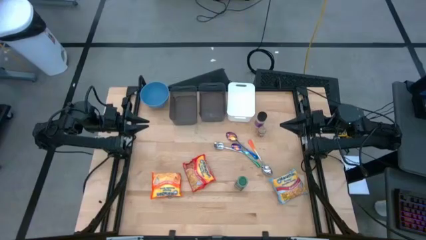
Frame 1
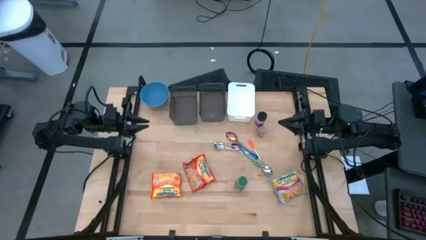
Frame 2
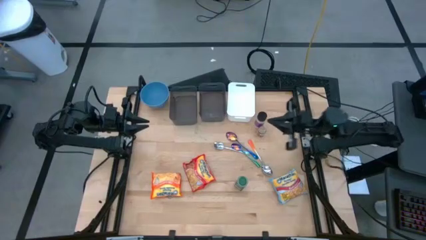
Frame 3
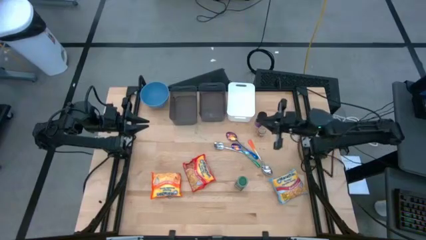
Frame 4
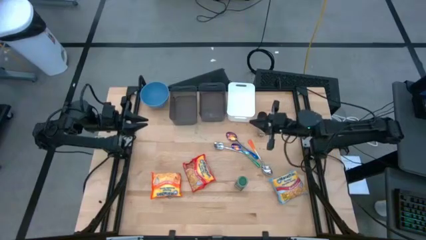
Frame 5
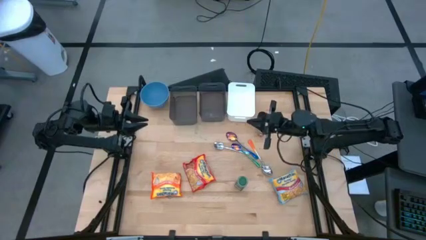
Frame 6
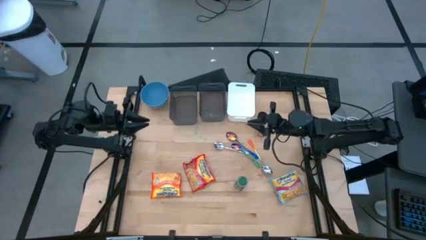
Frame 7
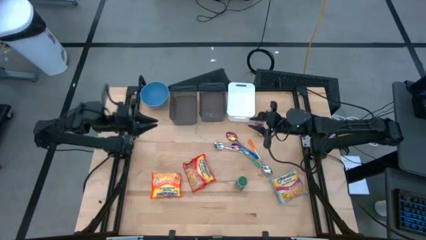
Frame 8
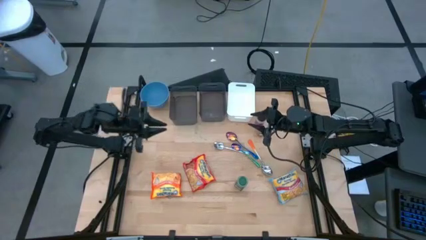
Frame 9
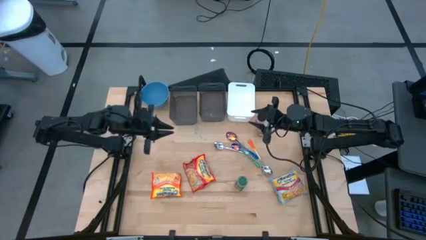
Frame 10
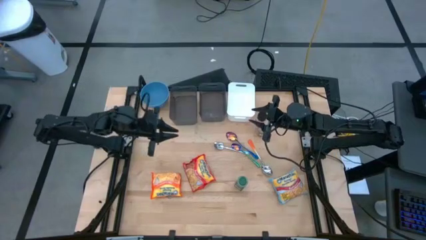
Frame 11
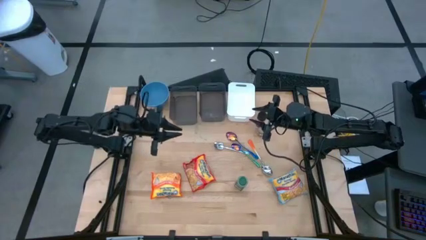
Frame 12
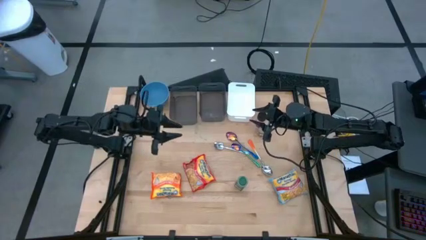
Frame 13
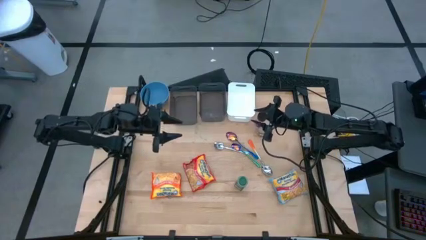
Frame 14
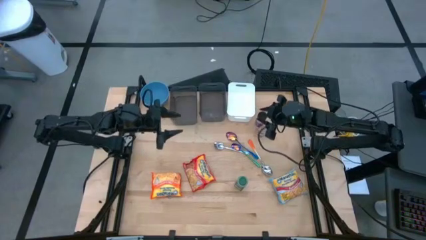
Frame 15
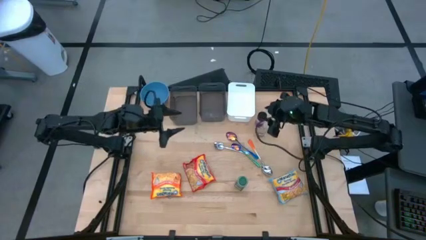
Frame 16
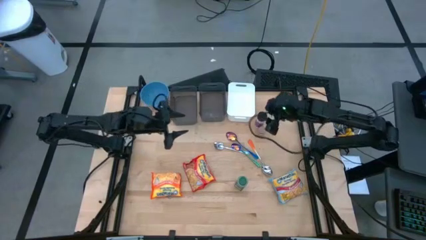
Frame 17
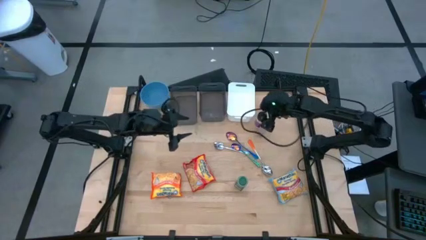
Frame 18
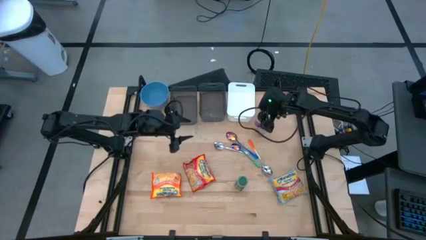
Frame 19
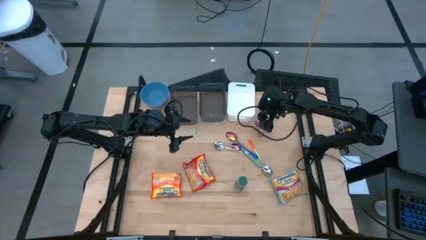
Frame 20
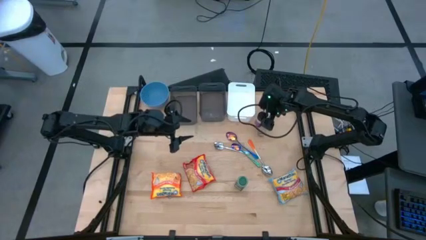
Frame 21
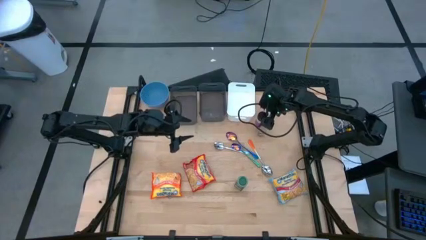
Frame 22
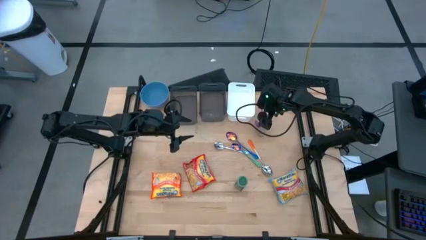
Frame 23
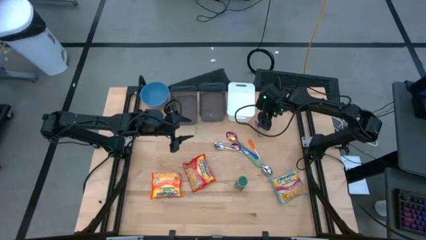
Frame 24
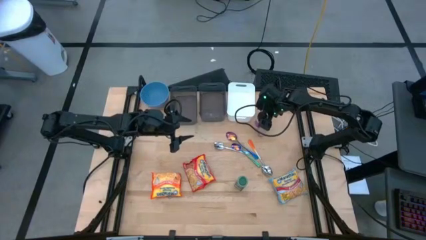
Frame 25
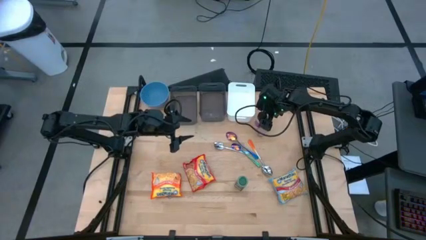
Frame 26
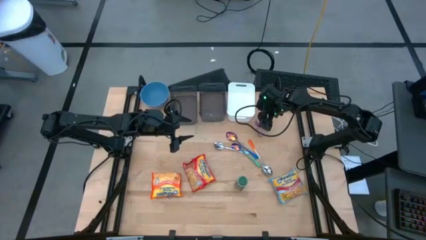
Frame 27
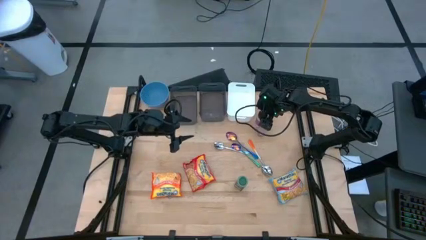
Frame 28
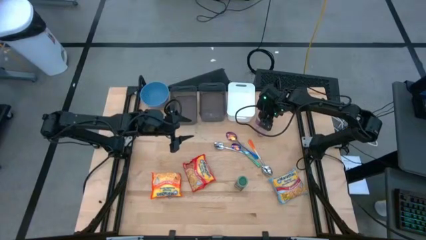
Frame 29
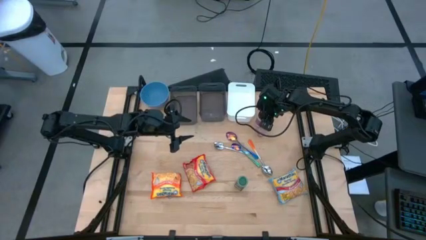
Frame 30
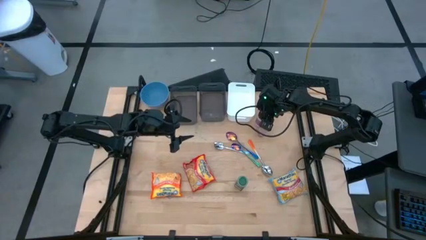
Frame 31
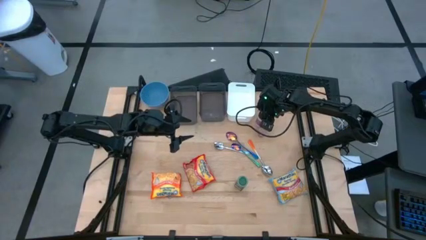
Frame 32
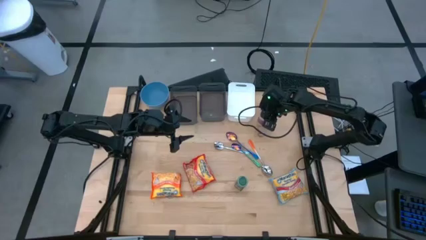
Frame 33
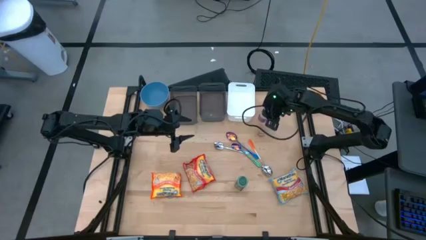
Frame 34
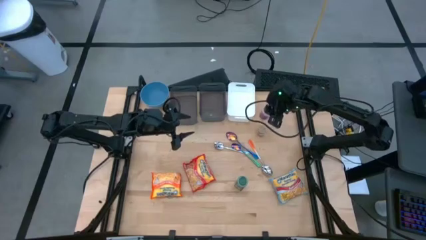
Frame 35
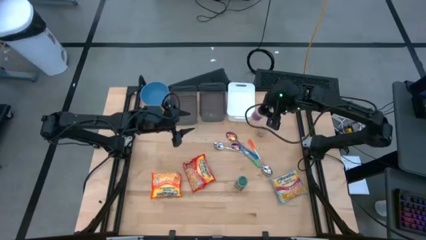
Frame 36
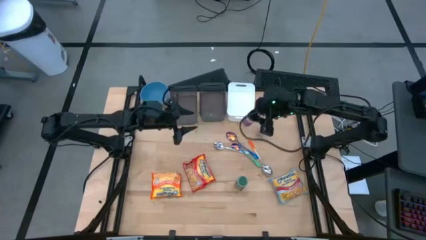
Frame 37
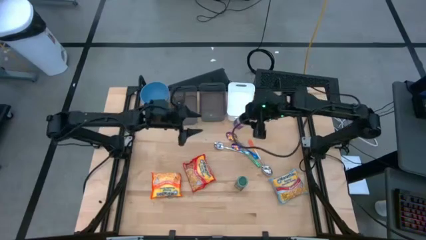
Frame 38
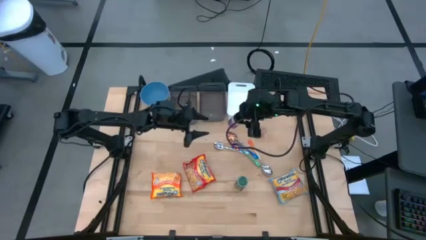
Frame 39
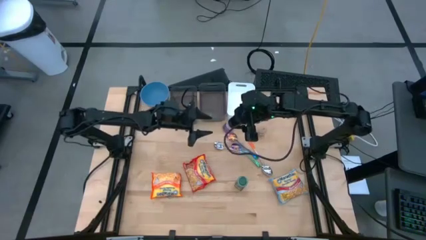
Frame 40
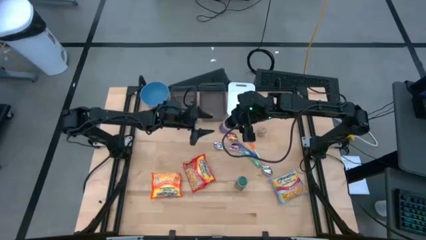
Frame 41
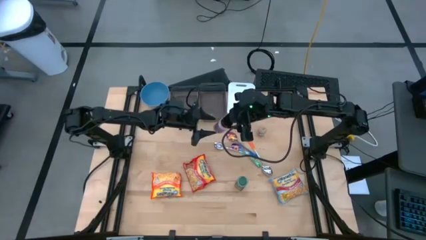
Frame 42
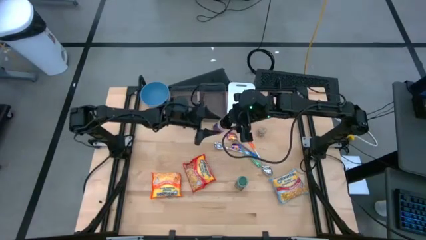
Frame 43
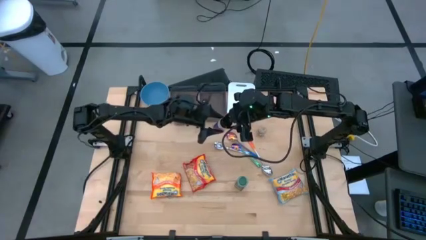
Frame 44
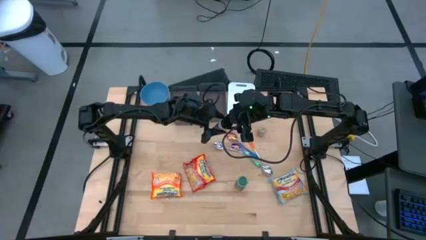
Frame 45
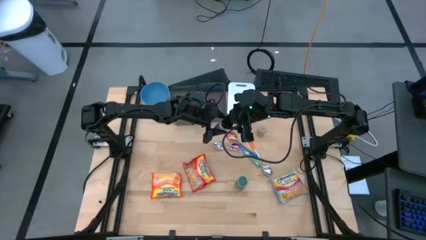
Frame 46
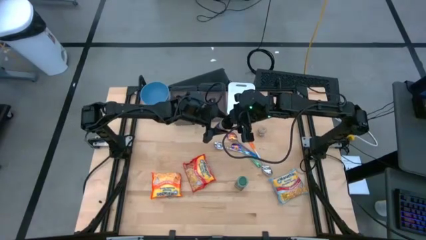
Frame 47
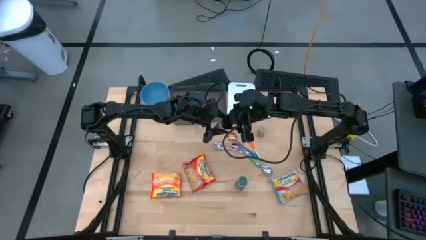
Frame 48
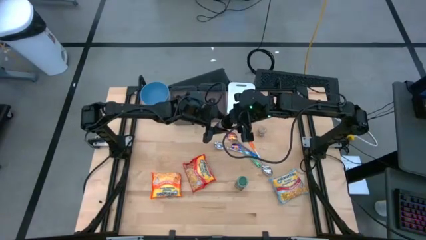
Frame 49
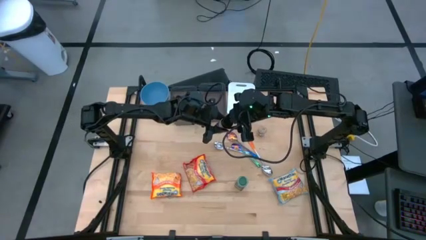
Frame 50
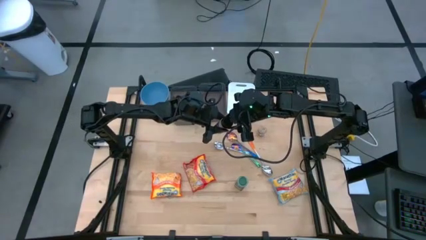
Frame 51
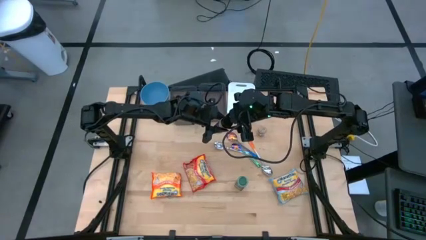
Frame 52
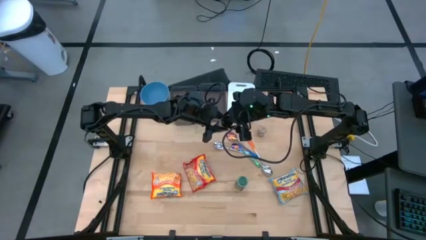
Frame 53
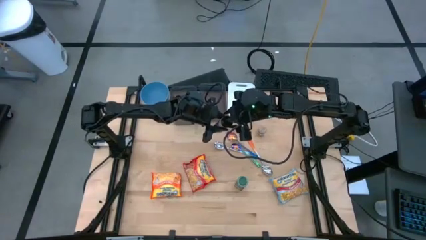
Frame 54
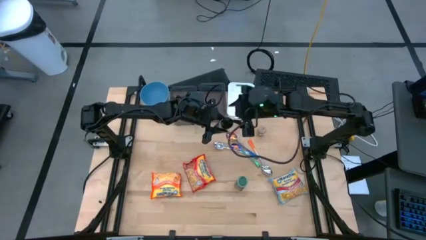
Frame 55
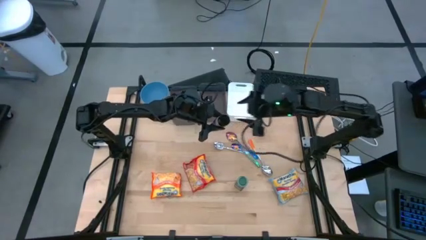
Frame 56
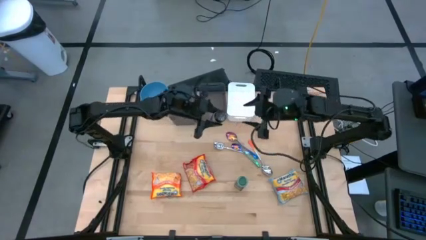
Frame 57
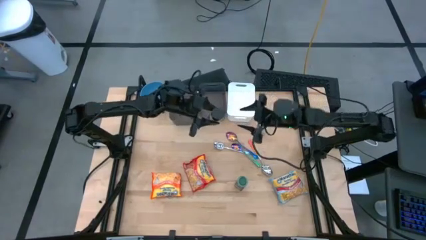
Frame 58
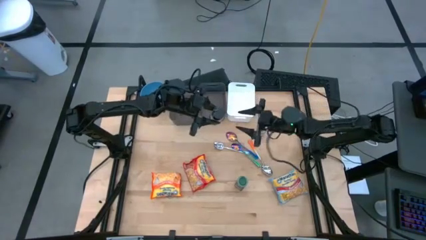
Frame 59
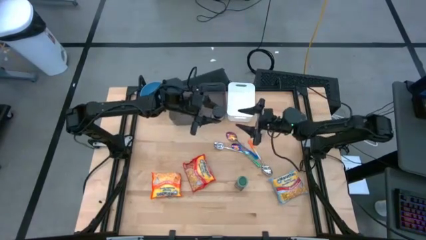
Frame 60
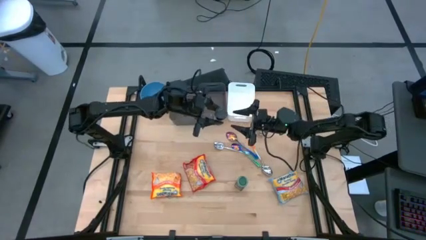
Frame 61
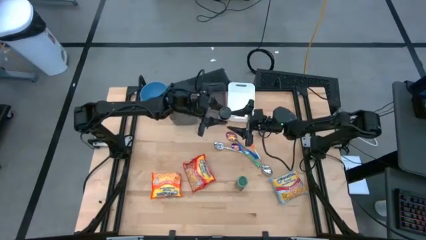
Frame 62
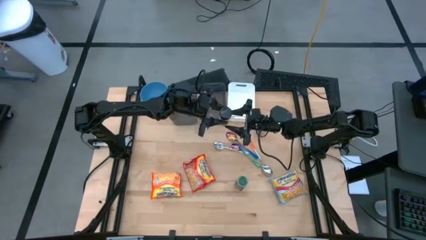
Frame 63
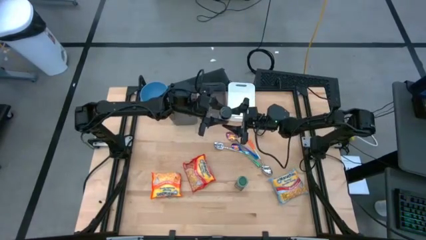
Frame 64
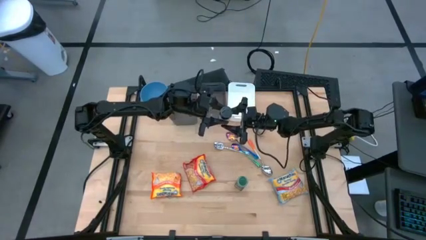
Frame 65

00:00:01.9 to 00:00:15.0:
Task: Pick & Place Food Item
Put the purple spice bottle into the left black bin
